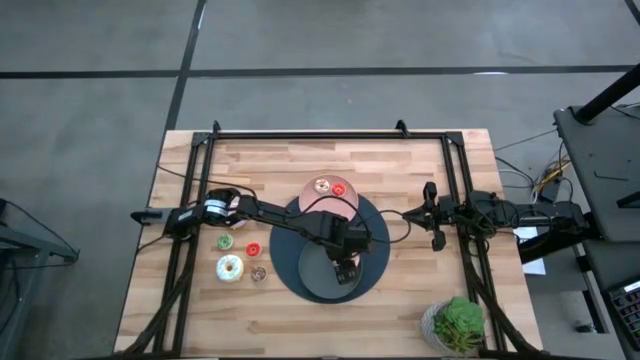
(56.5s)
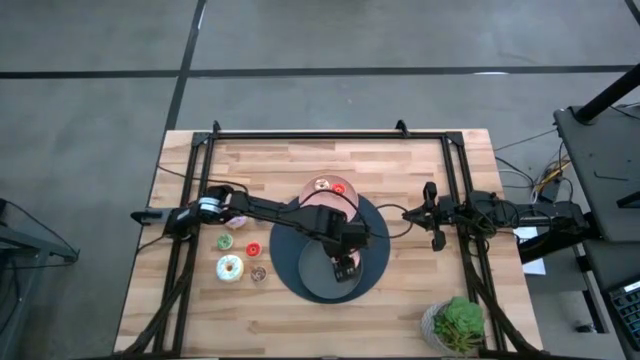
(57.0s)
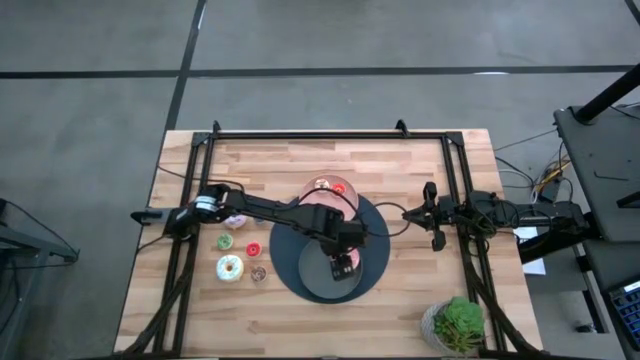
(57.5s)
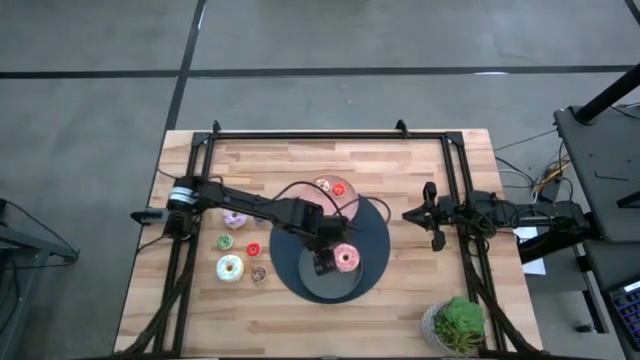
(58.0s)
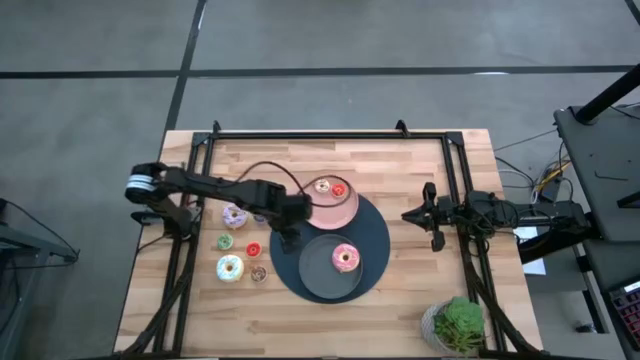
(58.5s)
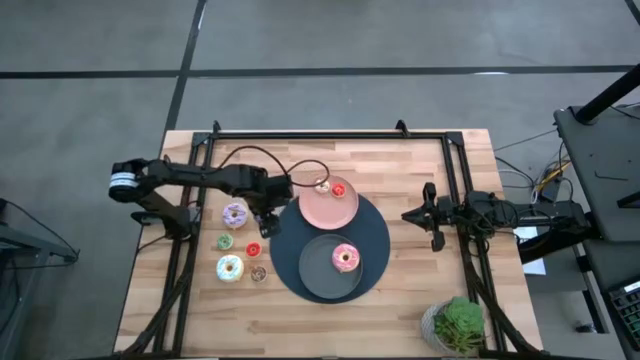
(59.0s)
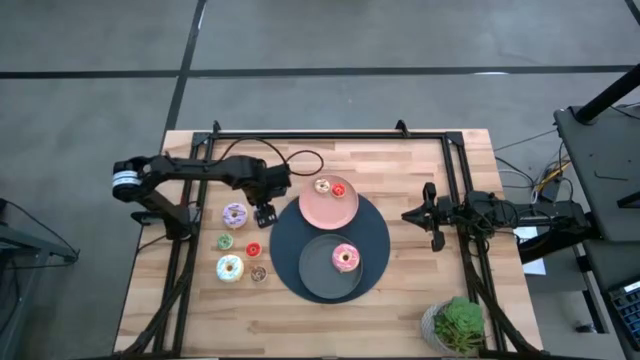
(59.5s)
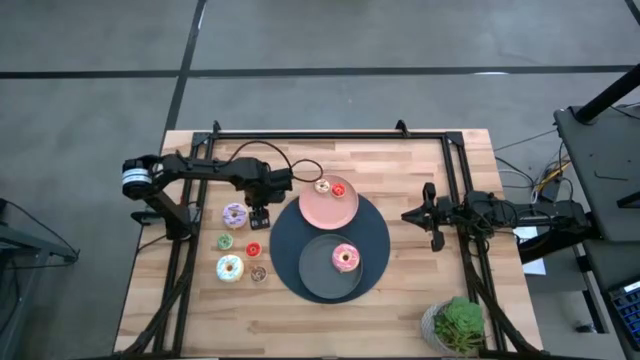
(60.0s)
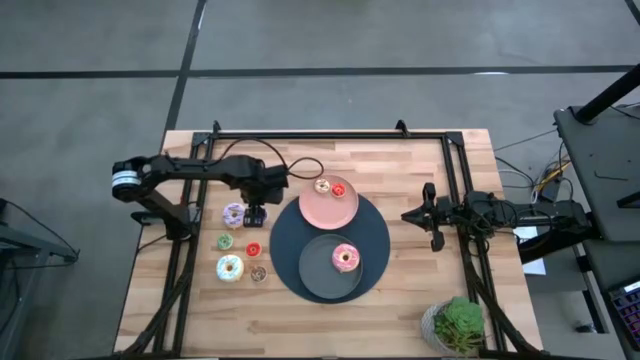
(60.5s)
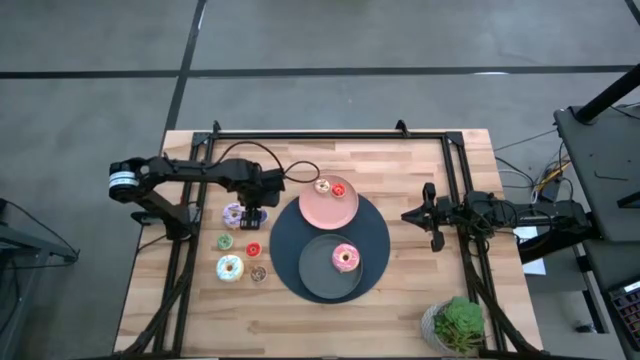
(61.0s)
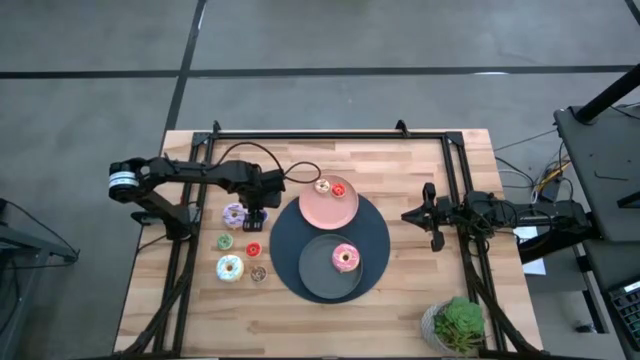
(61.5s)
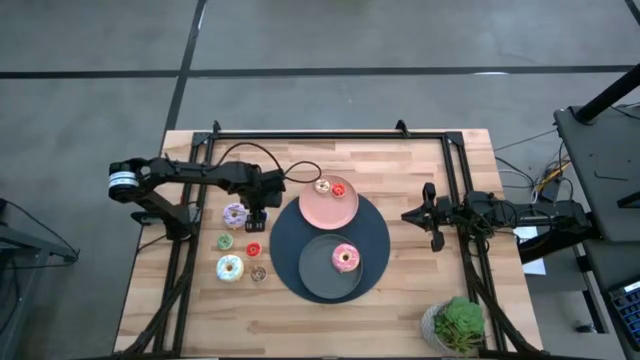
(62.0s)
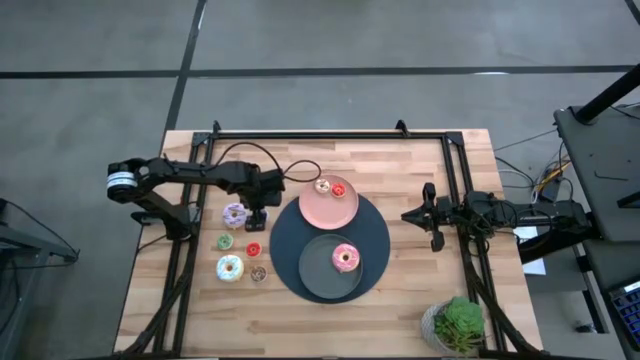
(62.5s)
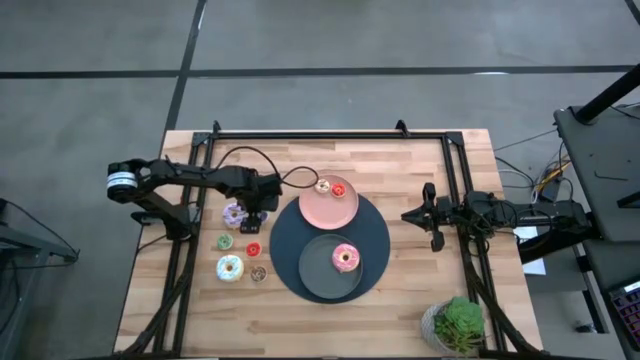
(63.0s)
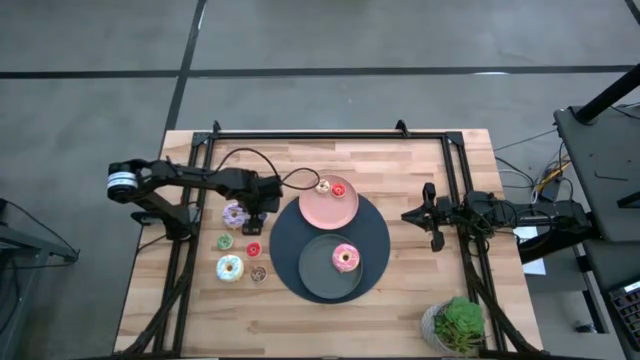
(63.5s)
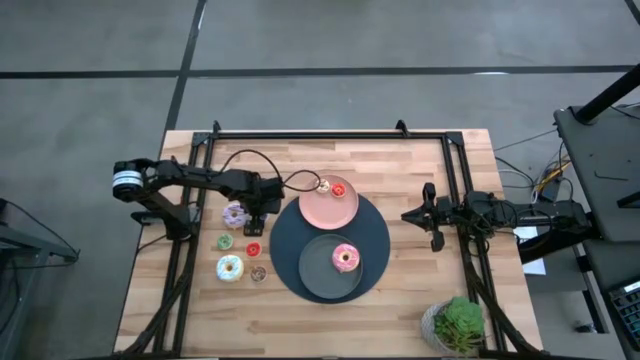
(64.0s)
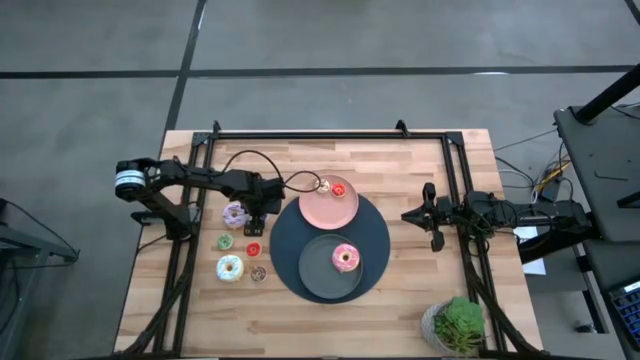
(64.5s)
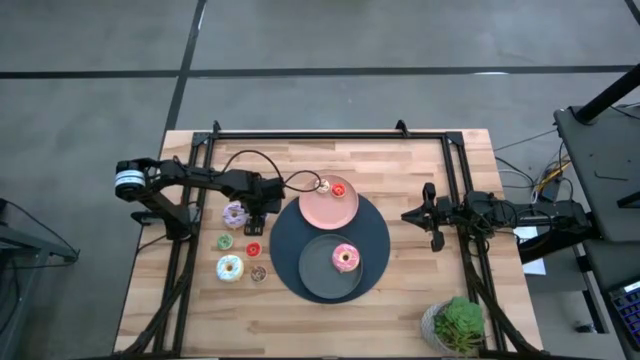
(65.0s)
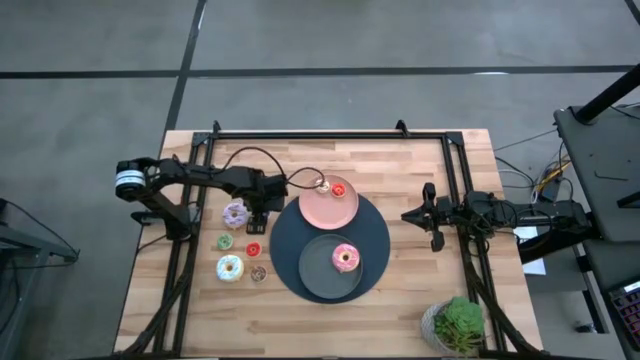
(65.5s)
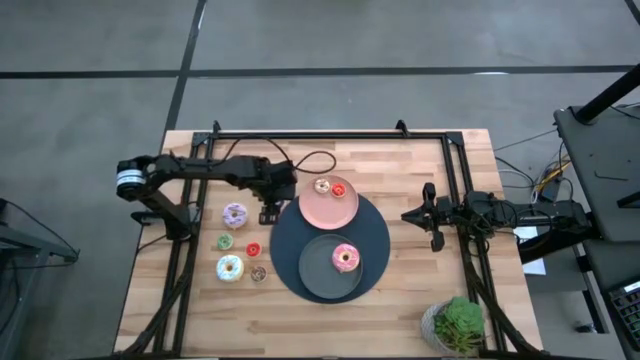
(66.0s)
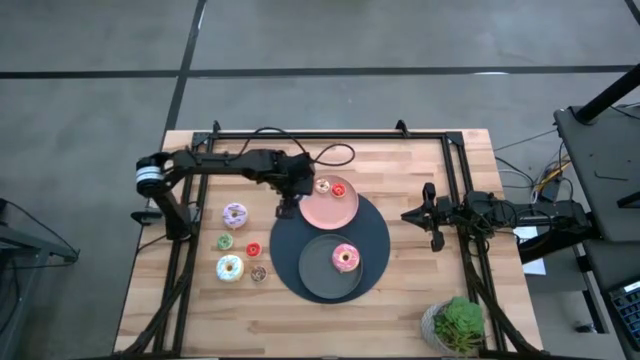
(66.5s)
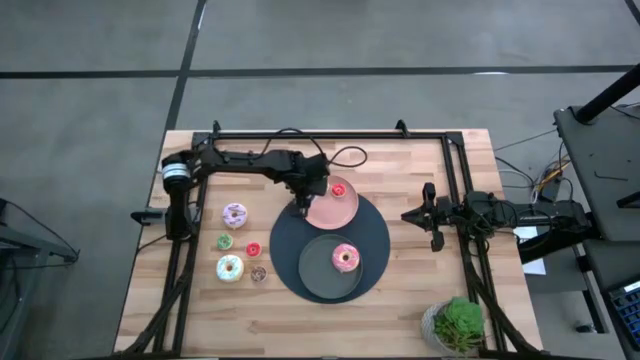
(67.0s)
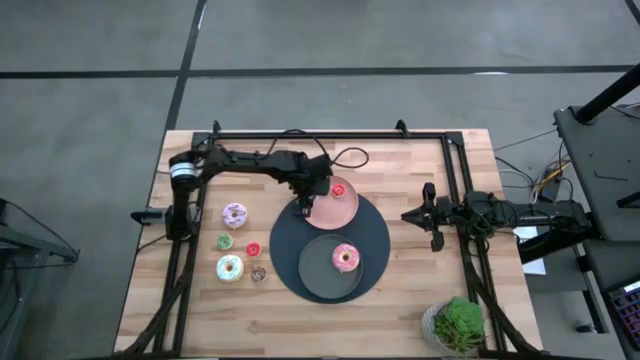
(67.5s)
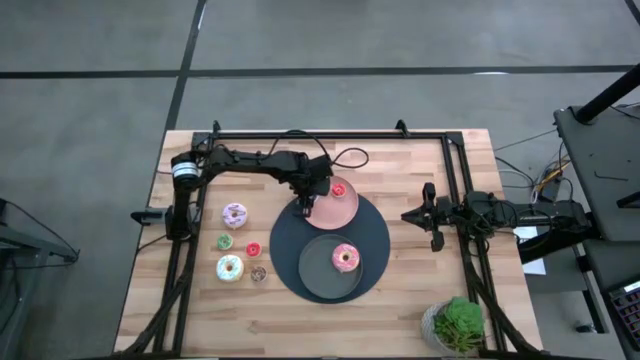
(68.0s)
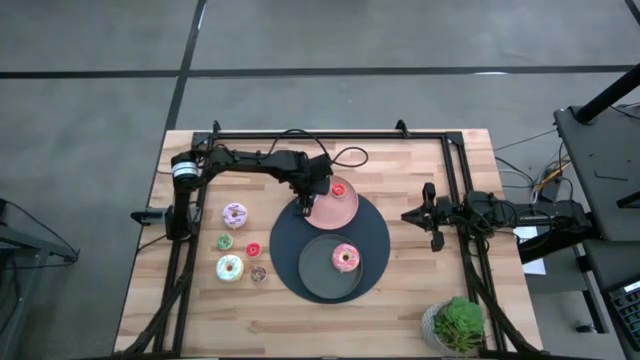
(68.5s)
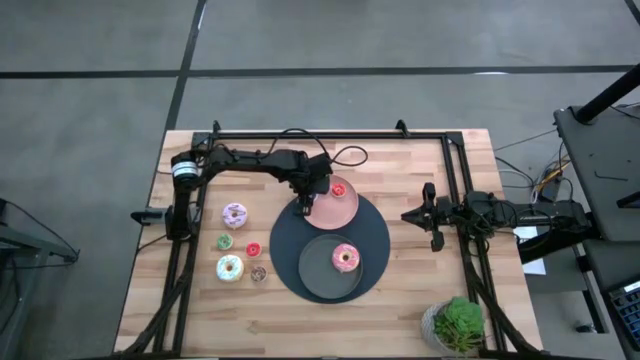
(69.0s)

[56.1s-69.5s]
Task: Pick & Place donuts
Put the small blue donut on the pink plate
